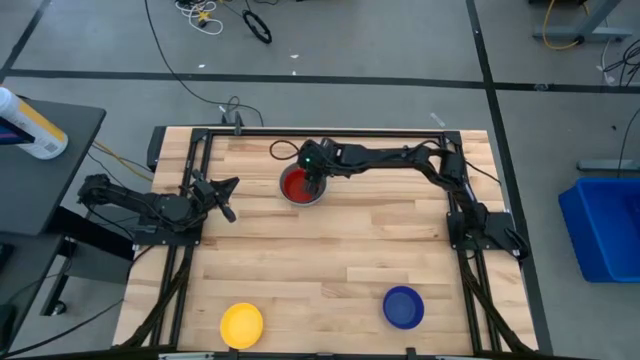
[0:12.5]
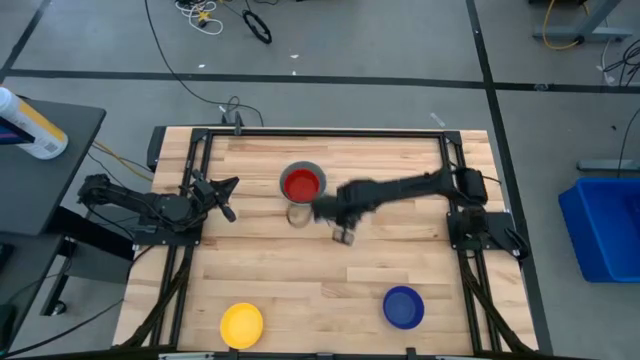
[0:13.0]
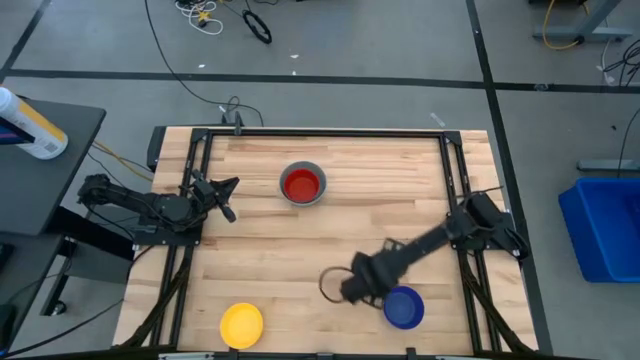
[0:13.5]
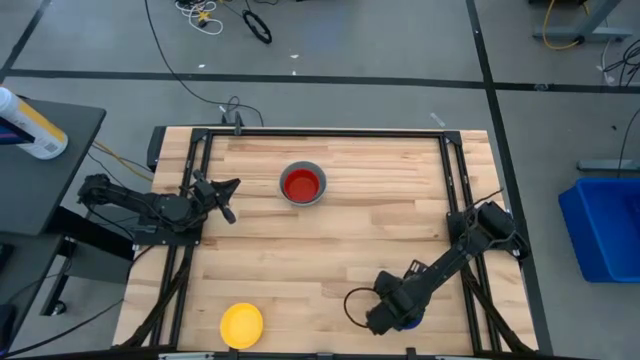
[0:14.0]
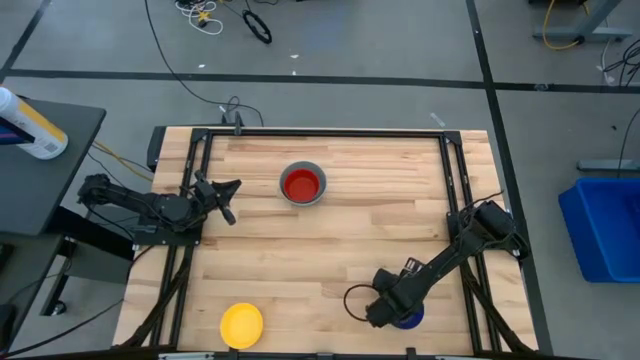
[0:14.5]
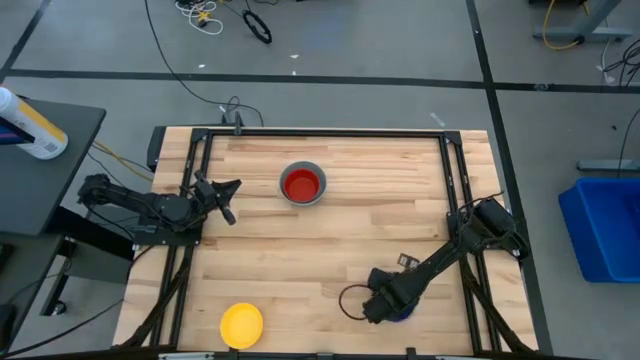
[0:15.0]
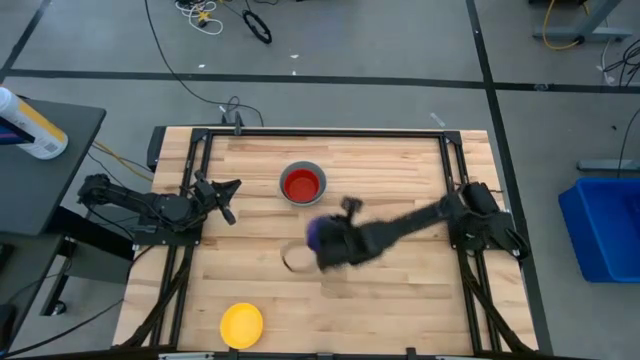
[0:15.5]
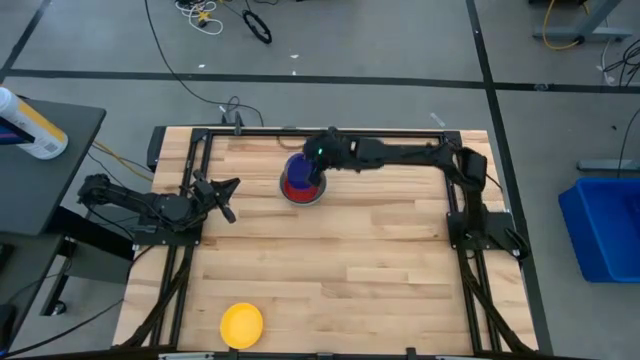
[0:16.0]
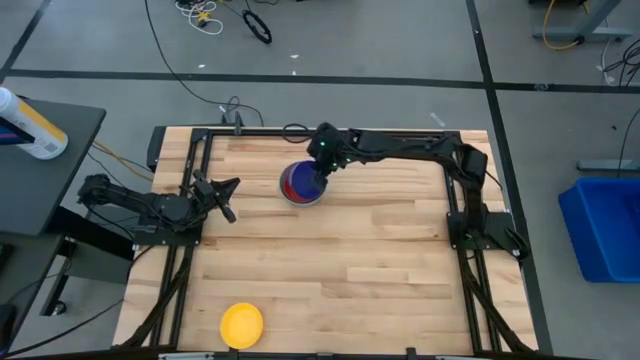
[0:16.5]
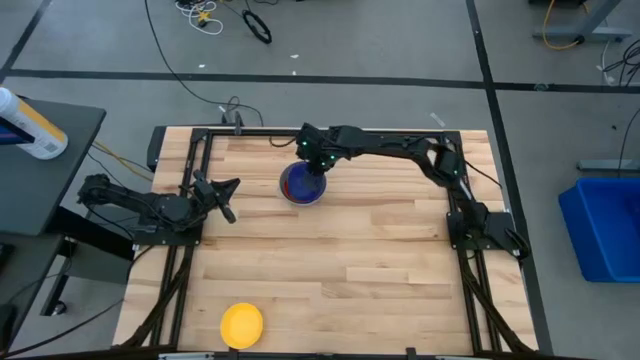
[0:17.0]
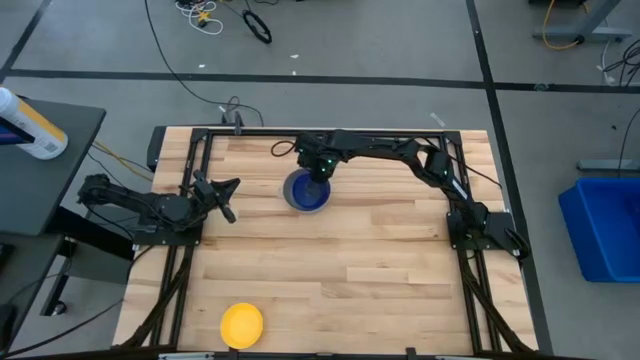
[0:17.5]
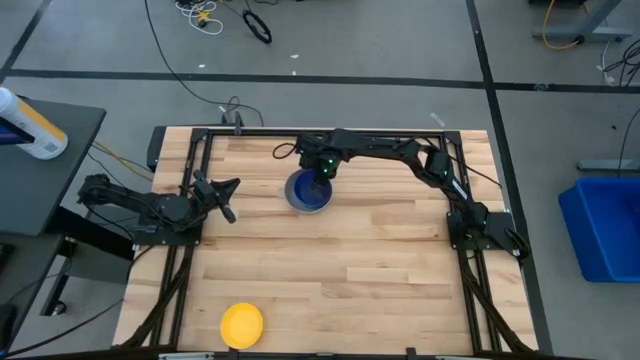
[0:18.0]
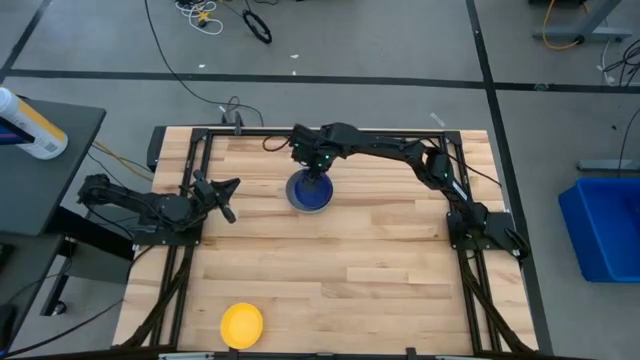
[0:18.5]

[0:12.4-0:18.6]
Stack the blue bowl on top of the red bowl

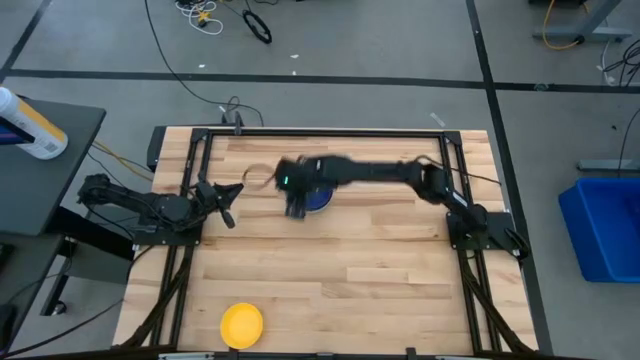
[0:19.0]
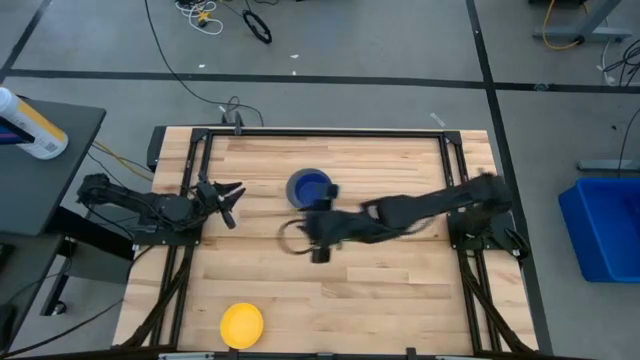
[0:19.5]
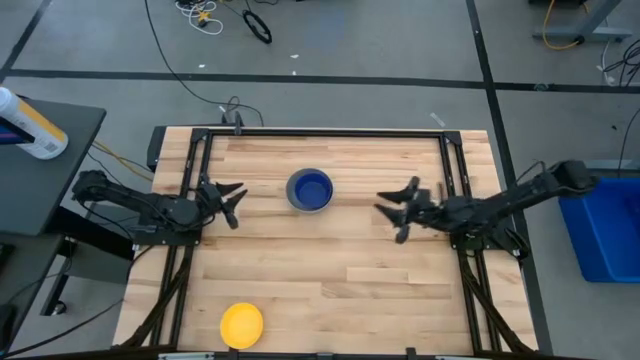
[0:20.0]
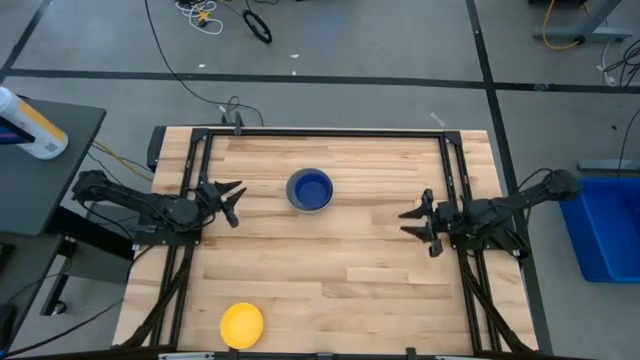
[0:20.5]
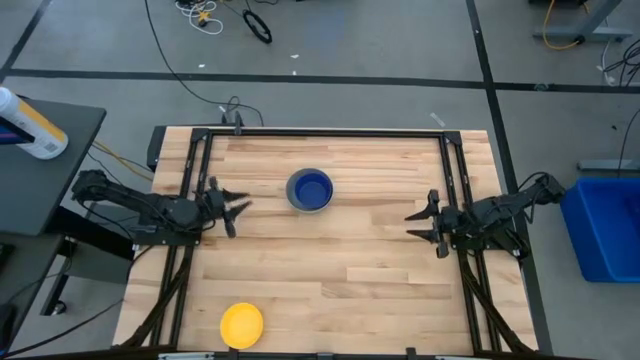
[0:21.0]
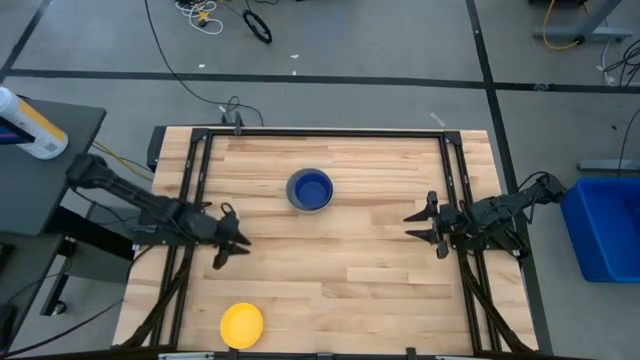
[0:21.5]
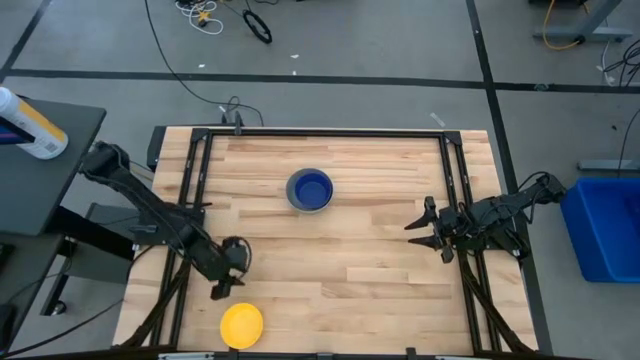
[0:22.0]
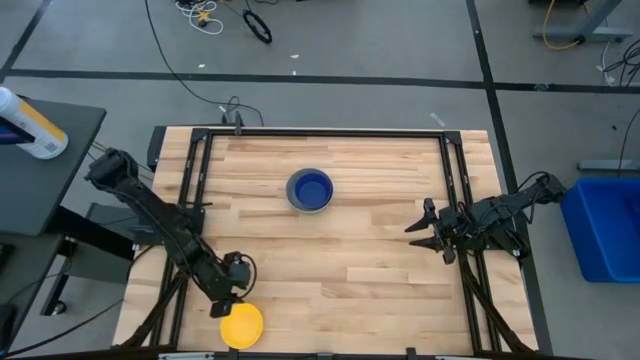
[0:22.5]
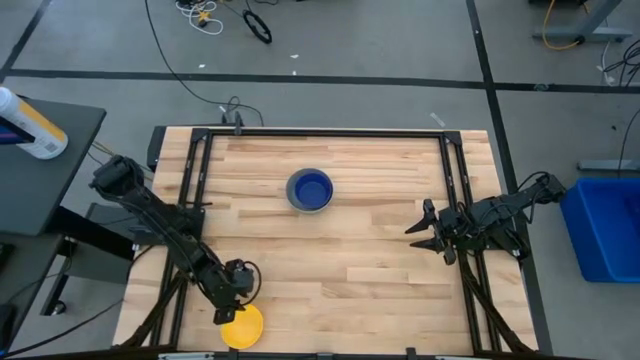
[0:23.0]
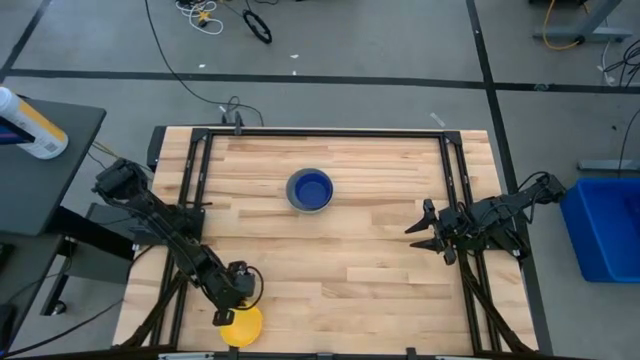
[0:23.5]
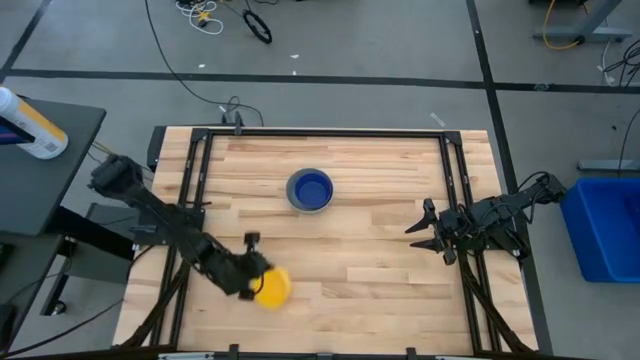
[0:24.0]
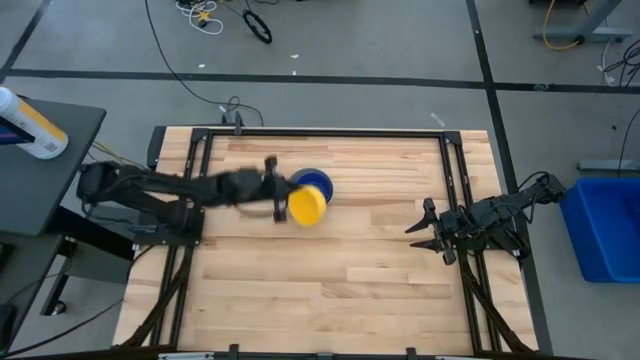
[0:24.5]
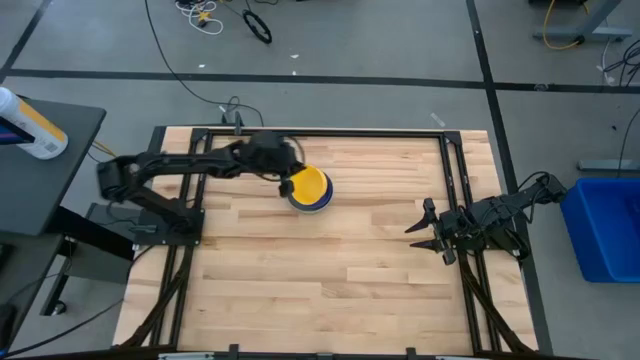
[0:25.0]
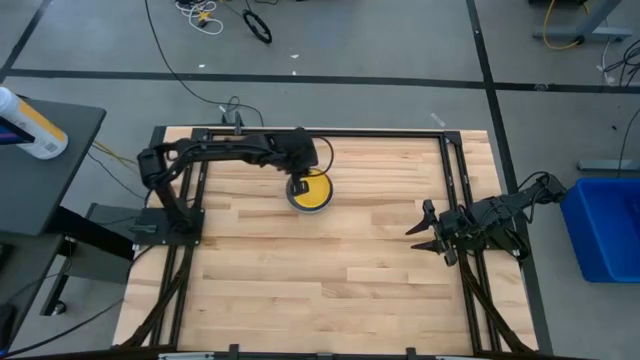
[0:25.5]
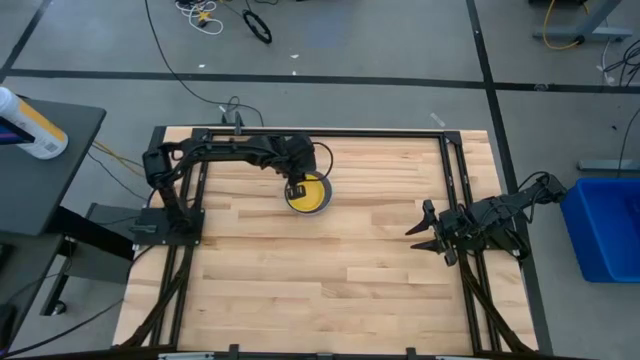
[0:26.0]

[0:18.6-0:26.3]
Stack the yellow bowl on top of the blue bowl

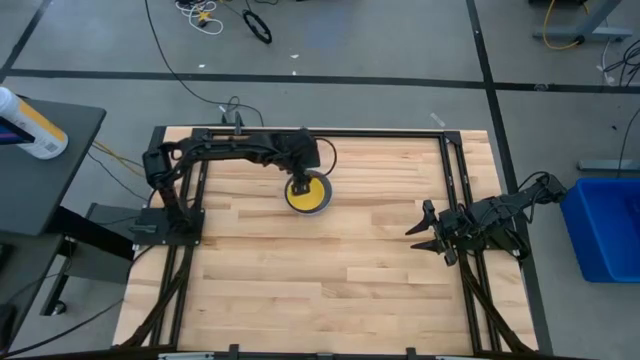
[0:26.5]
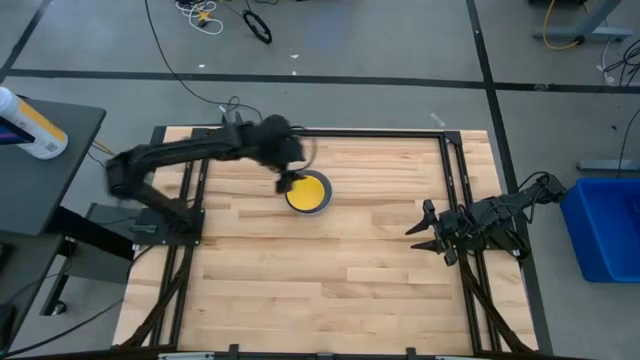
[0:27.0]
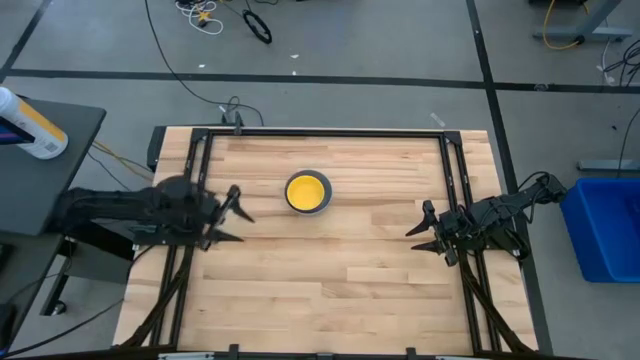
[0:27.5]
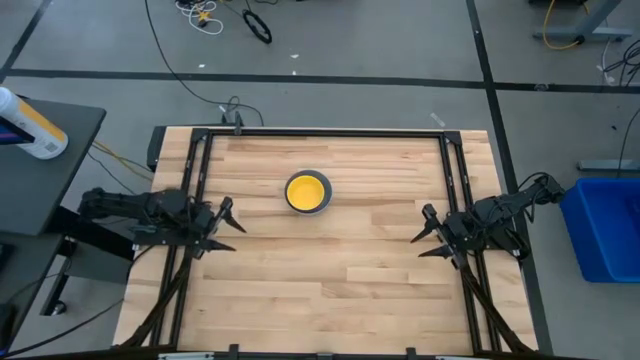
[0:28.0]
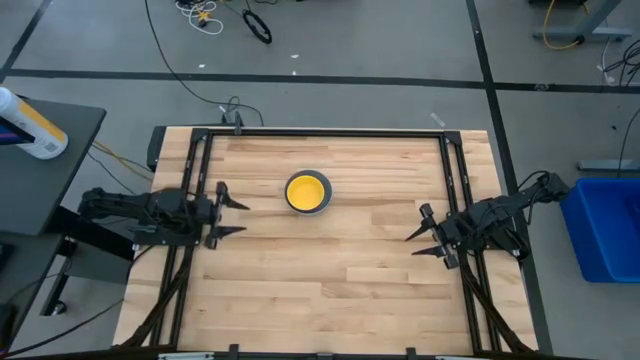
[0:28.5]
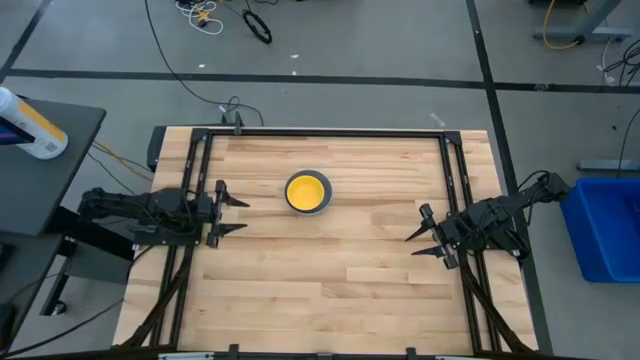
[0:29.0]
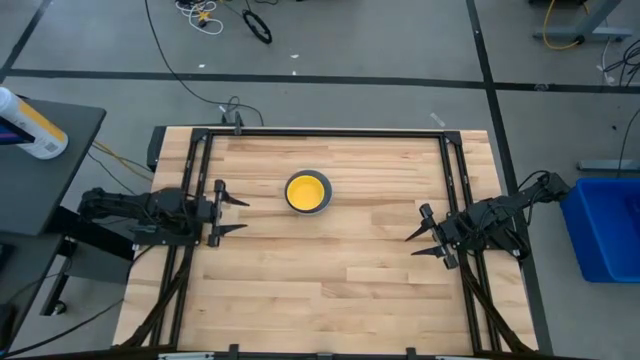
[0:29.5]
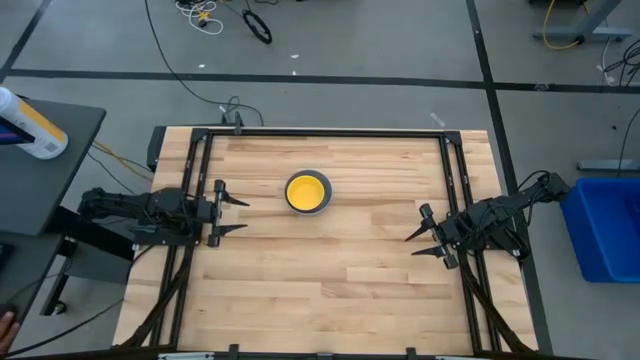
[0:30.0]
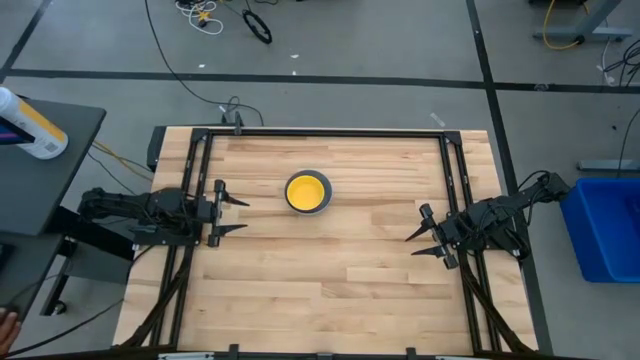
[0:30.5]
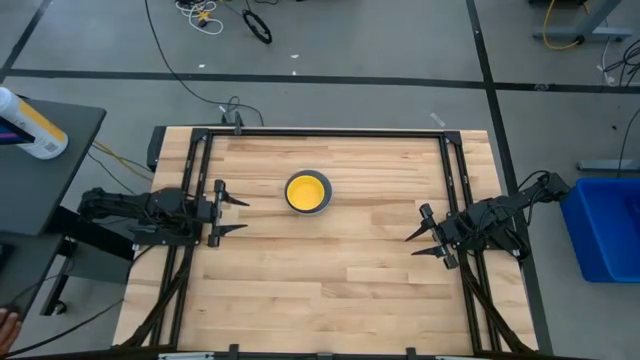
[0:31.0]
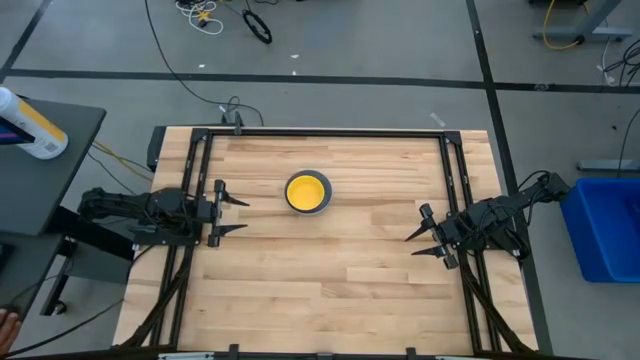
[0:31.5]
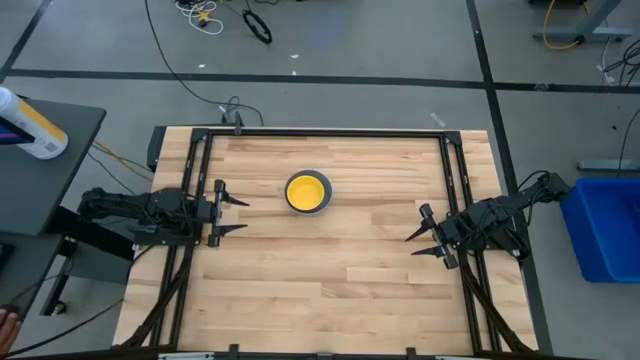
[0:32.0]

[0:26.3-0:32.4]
Return to Home Position
